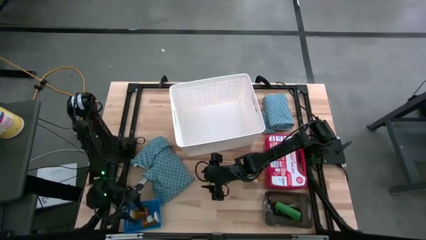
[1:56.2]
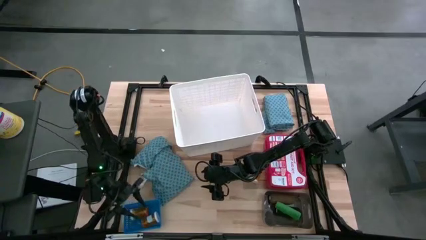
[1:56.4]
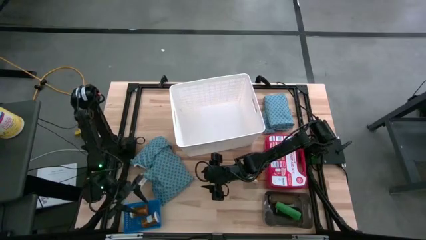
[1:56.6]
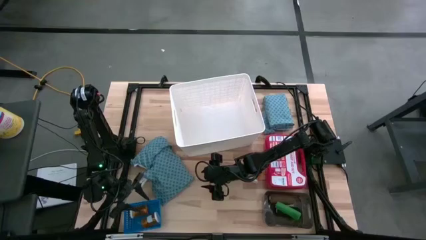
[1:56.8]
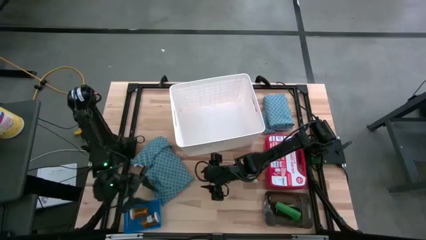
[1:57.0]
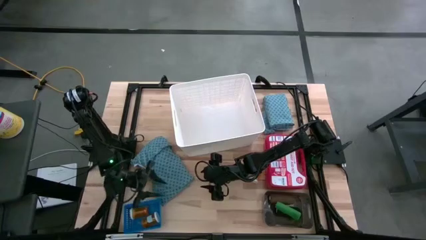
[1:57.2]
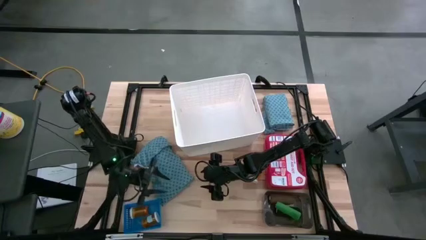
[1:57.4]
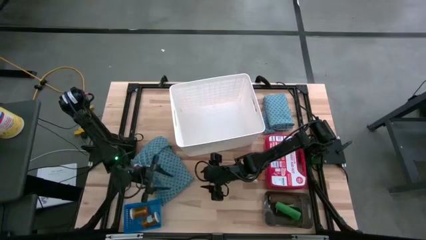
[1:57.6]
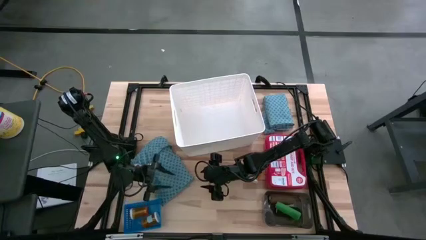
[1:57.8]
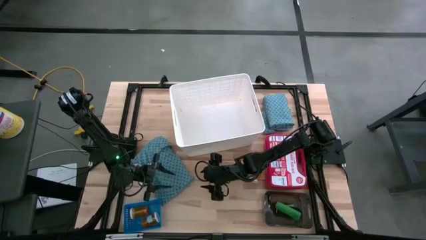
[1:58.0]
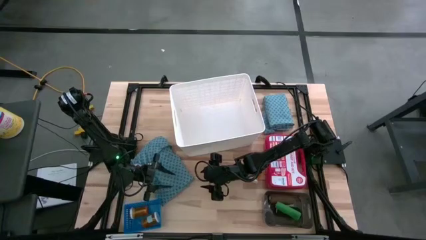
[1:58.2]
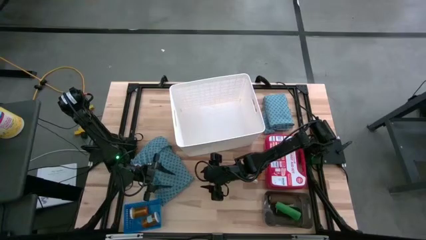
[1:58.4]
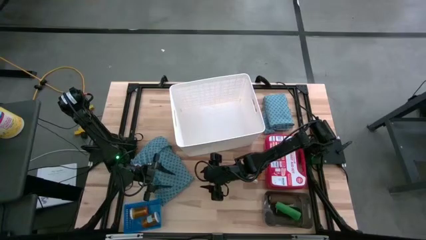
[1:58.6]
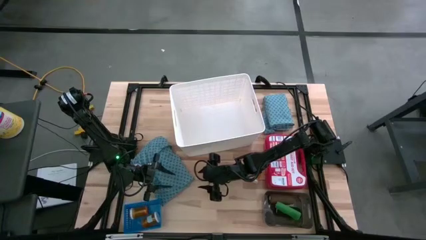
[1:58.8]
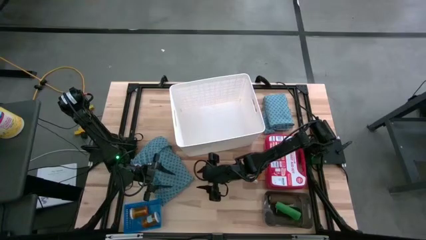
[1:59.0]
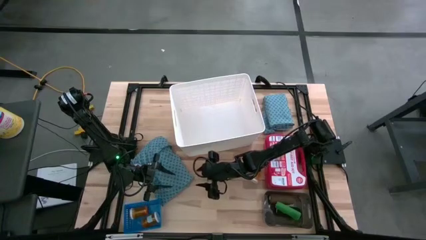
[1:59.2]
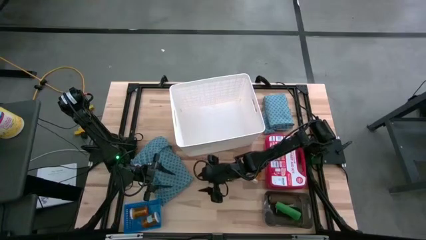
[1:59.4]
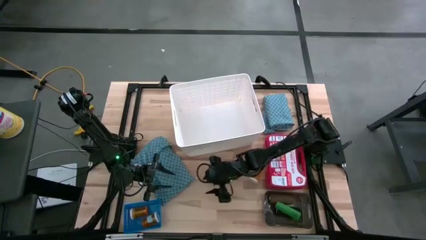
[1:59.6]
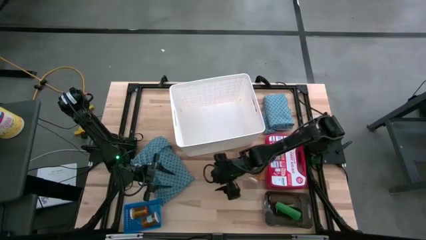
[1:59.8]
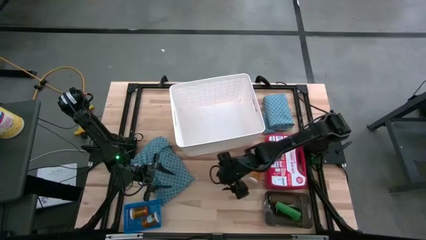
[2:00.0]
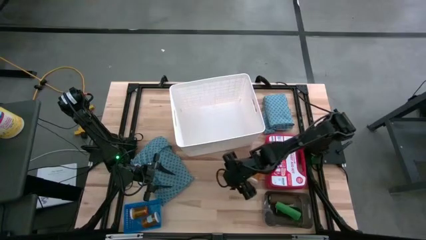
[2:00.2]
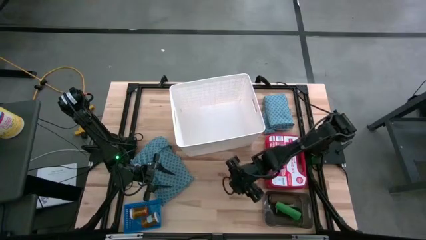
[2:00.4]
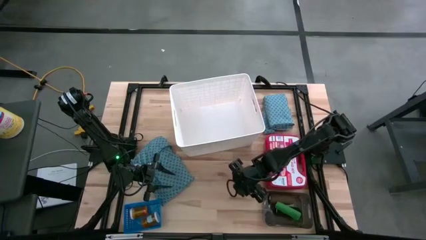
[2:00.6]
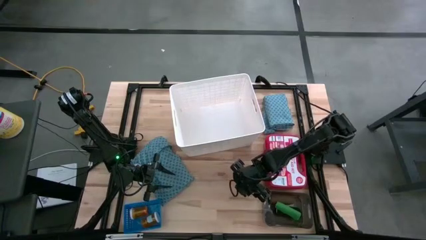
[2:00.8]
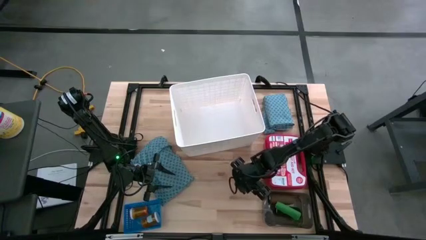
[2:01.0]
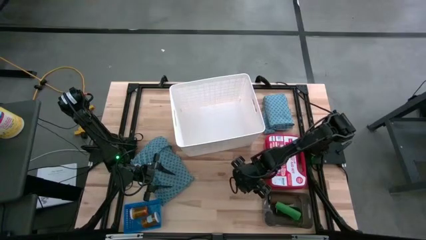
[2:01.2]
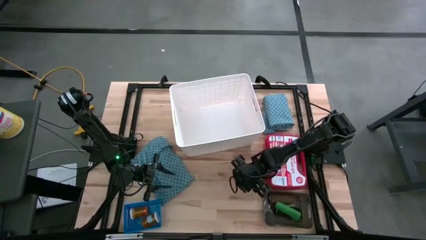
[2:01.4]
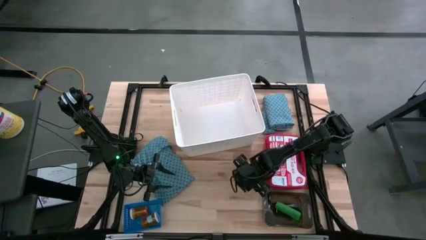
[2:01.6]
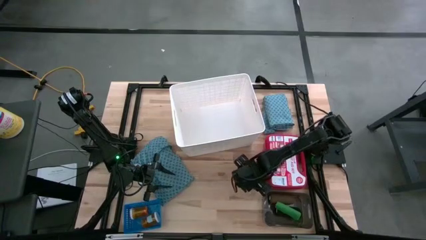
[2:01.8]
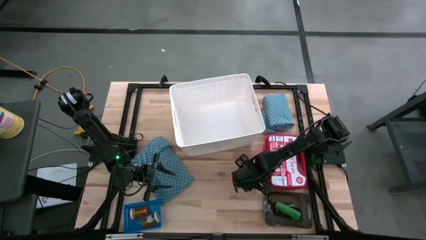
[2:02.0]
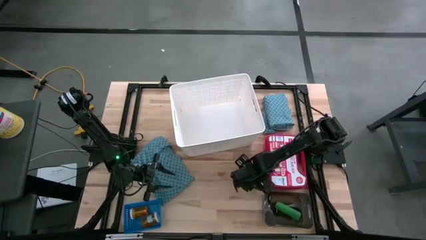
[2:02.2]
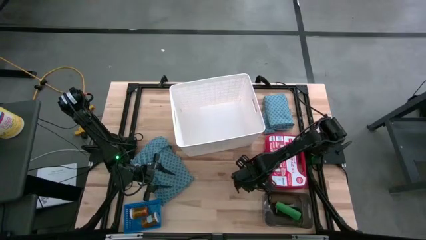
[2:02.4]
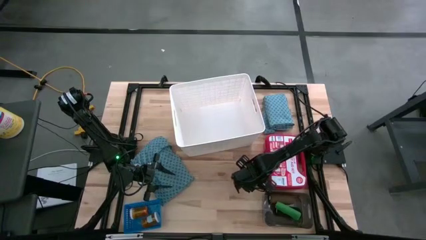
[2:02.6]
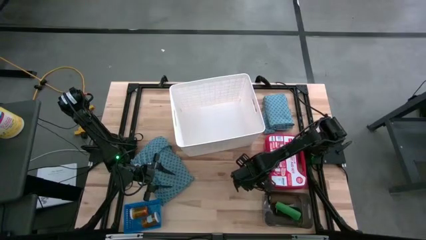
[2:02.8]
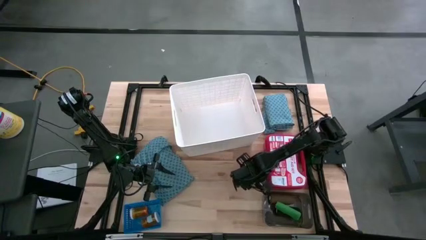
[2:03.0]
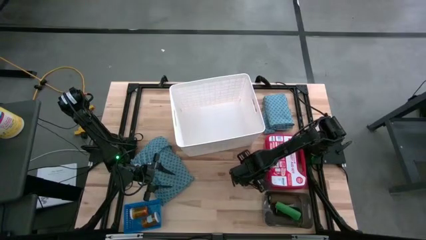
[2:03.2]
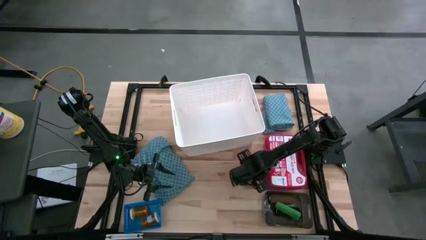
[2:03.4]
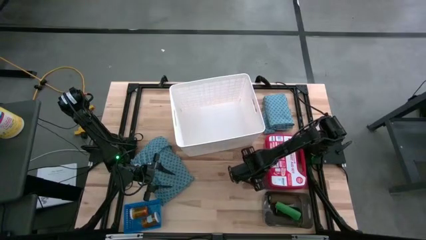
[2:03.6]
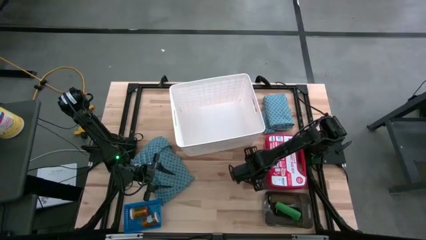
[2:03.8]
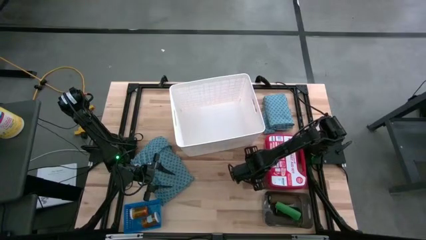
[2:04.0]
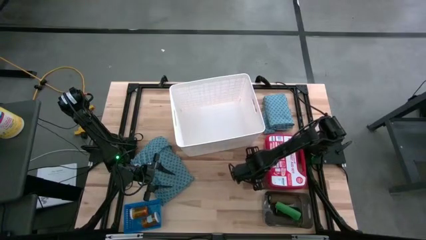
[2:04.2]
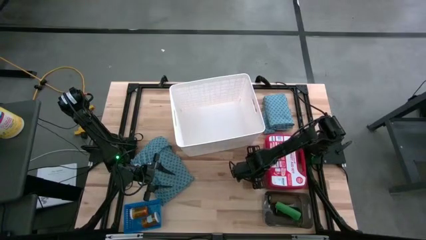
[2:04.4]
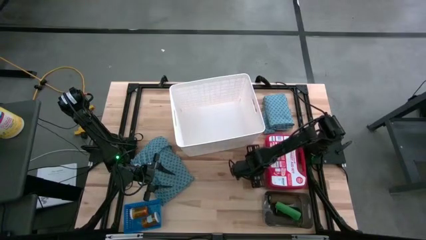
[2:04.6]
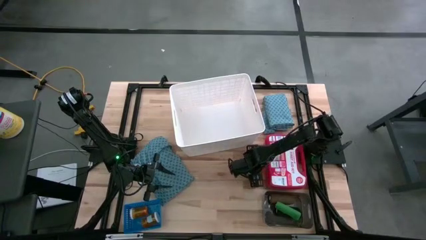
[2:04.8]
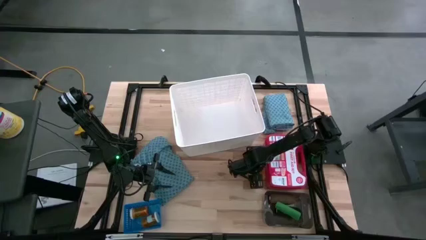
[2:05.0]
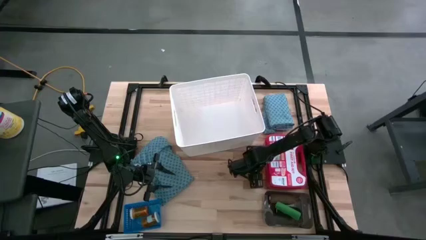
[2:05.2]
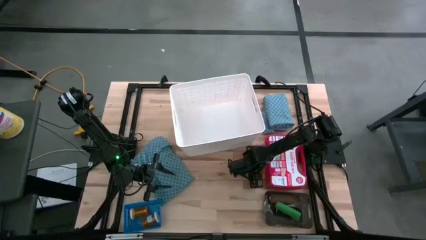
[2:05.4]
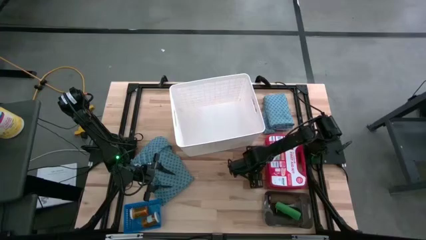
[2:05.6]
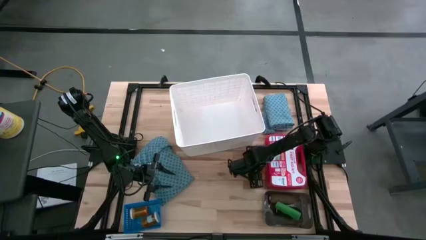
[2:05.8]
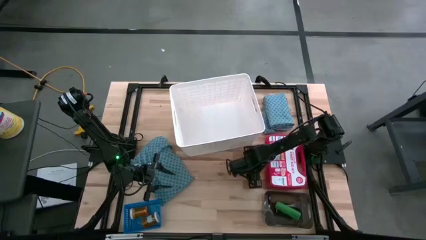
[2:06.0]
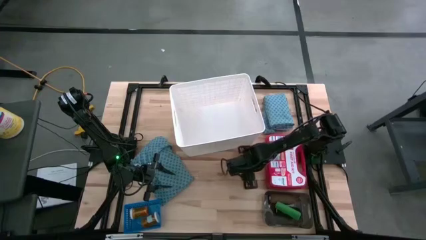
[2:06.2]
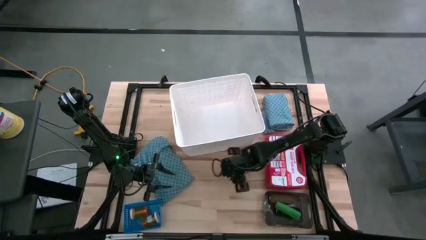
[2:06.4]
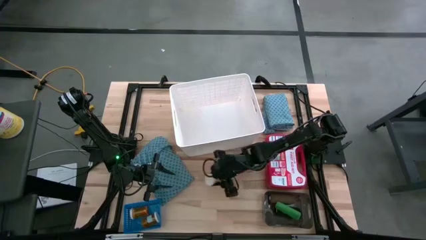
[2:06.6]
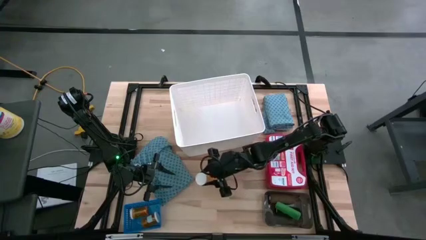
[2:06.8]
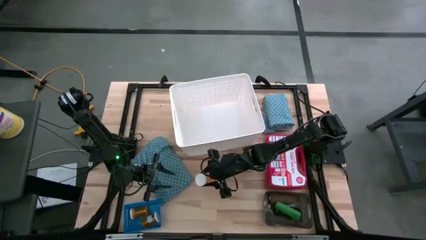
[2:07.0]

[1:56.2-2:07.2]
Task: Pick & place medical supplies in basket/bin
Put the orange pill bottle into the blue bin

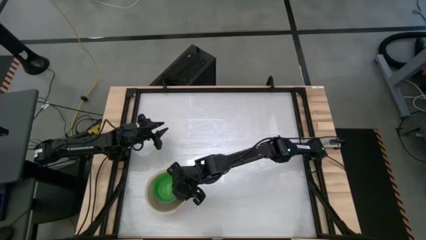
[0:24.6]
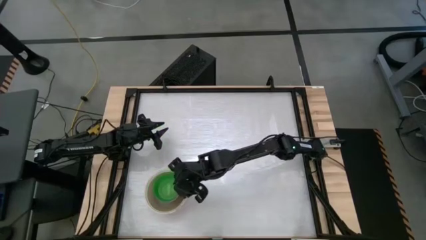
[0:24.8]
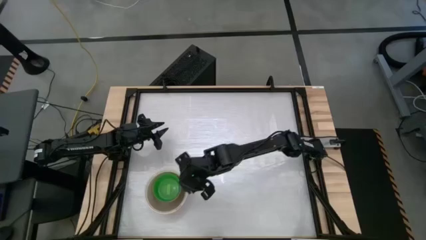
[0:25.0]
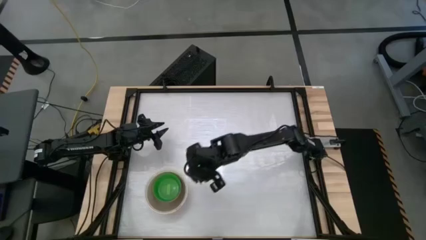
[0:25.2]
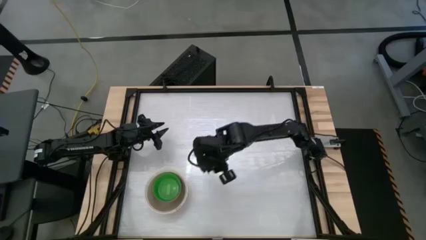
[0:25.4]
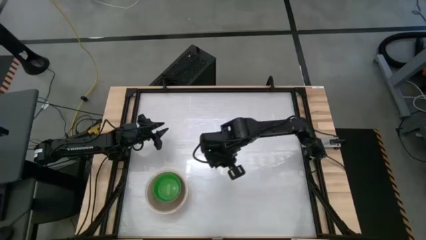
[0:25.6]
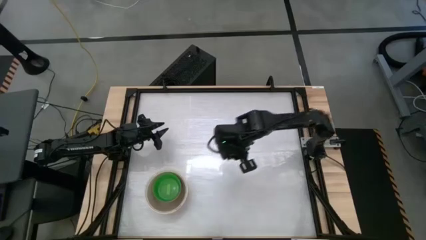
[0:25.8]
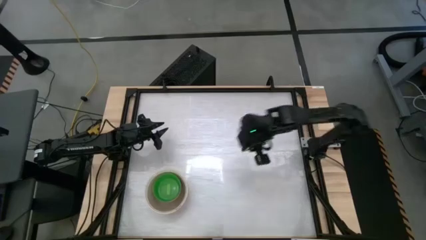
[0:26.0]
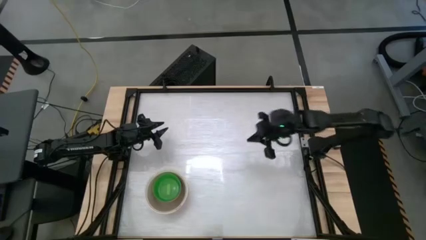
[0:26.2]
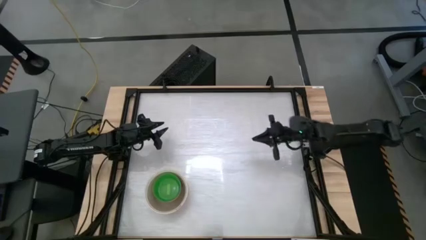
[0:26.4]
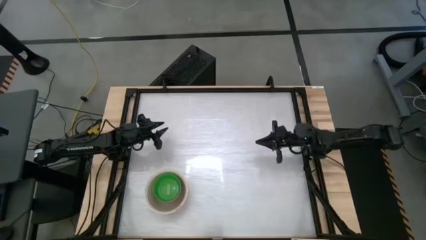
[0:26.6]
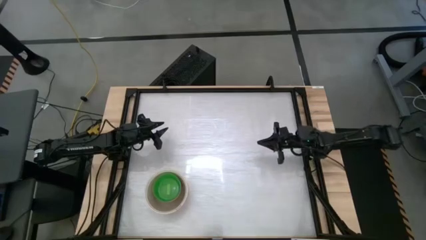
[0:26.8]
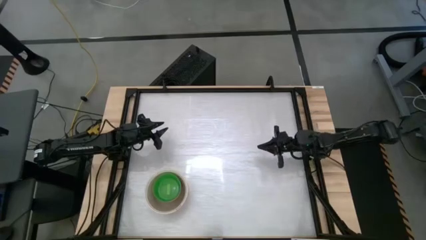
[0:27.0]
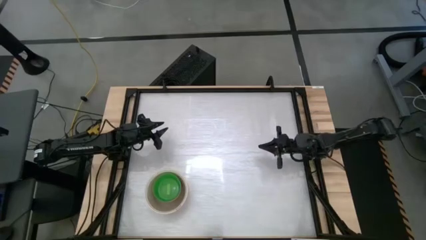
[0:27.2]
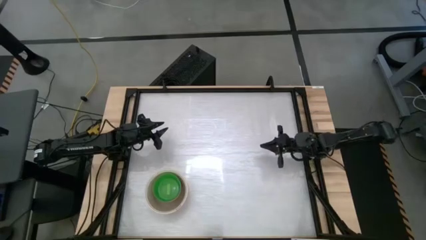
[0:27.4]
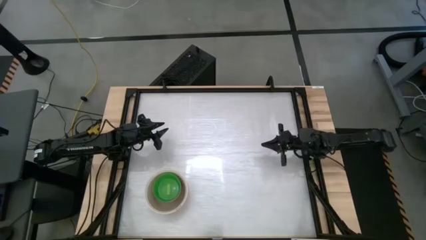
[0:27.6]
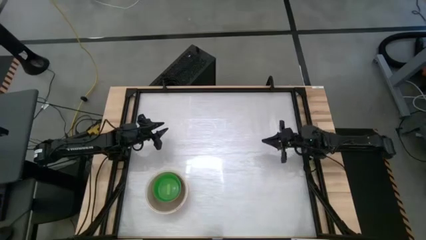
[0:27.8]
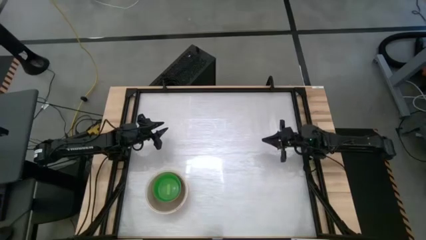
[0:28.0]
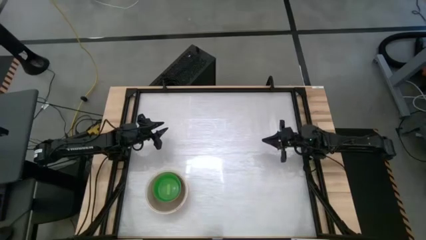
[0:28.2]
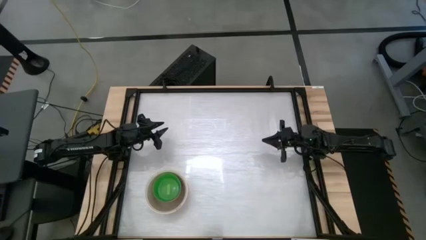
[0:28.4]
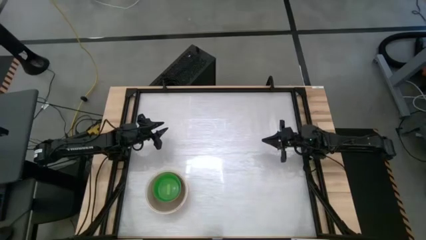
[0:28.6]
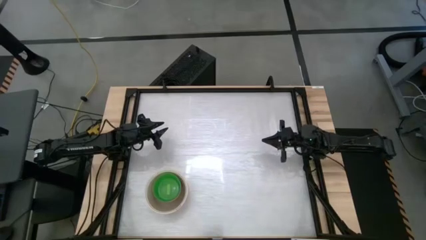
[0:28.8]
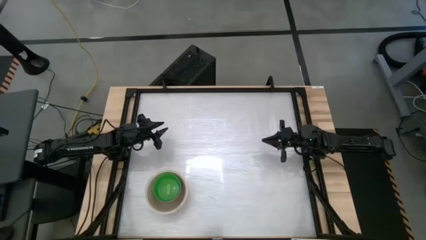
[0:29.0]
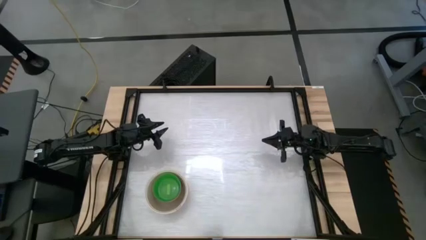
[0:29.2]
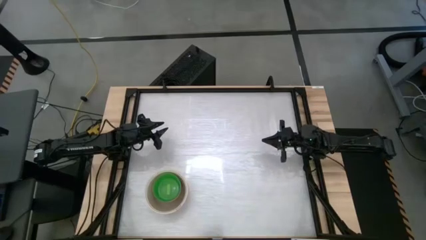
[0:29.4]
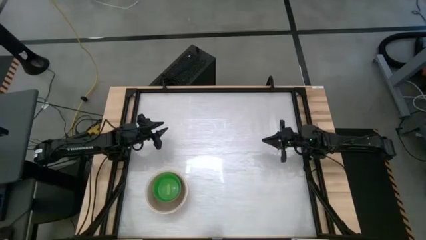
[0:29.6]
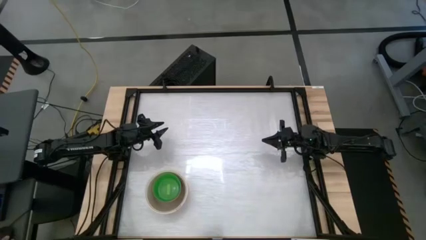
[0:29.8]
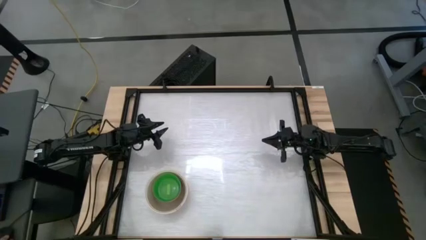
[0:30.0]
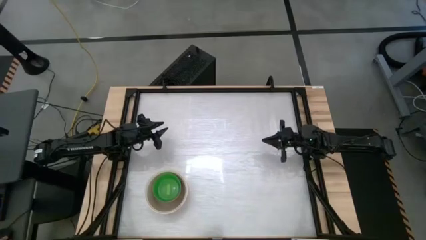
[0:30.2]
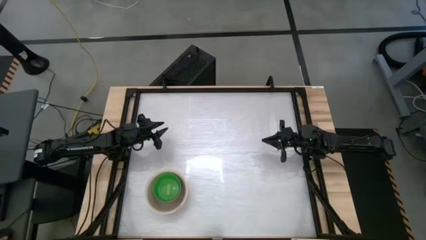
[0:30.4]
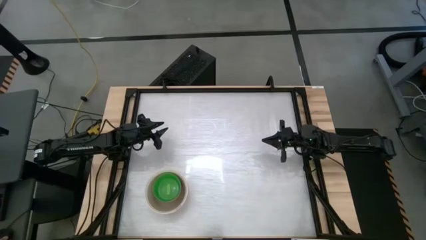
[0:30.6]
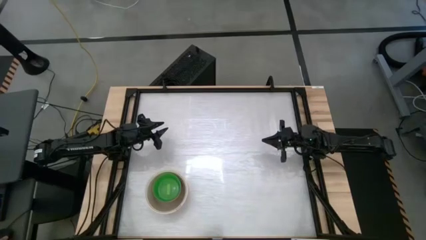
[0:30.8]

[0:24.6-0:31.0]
Task: Nest bowls inside each other by size order
Return to home position
